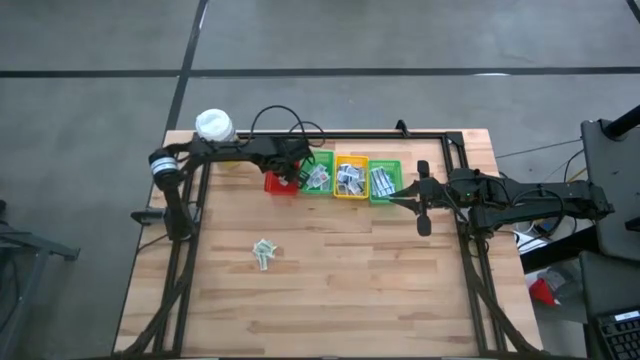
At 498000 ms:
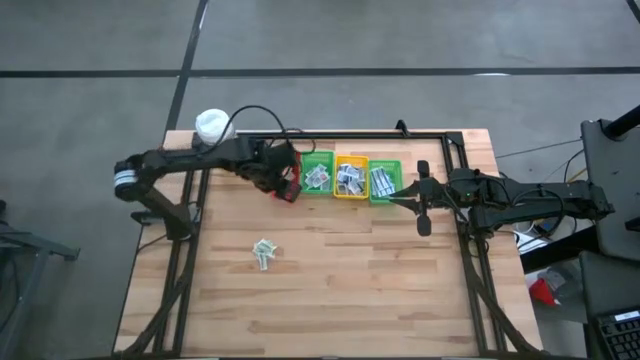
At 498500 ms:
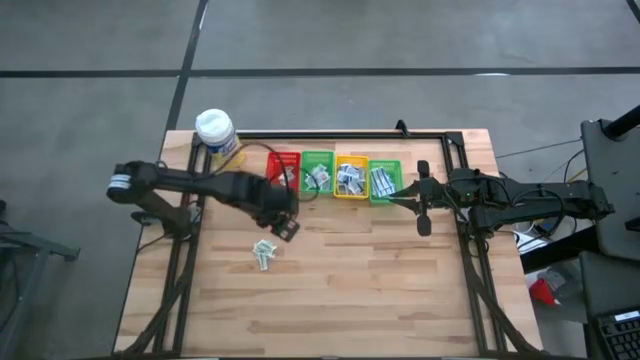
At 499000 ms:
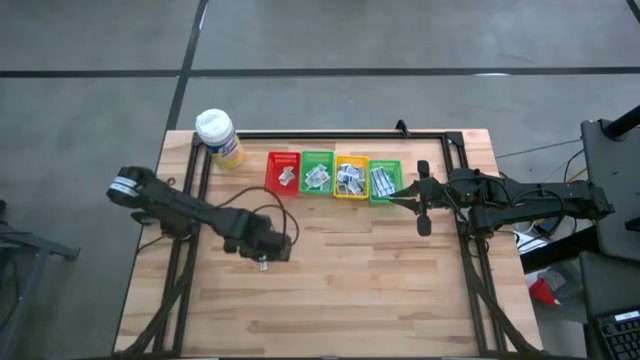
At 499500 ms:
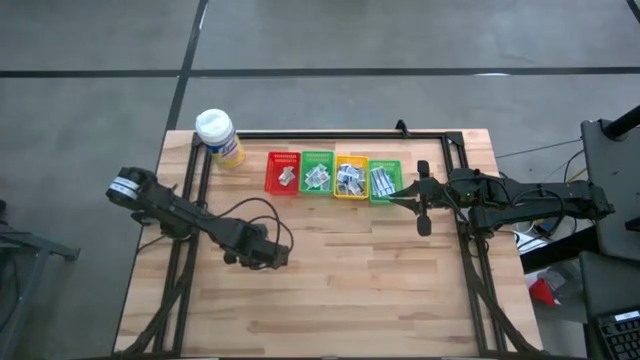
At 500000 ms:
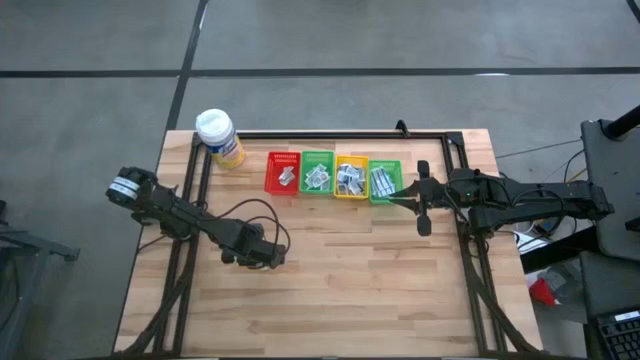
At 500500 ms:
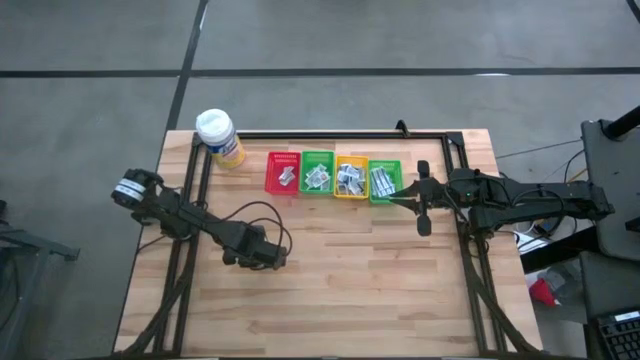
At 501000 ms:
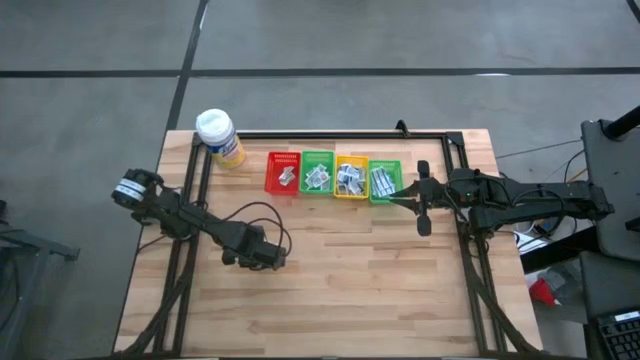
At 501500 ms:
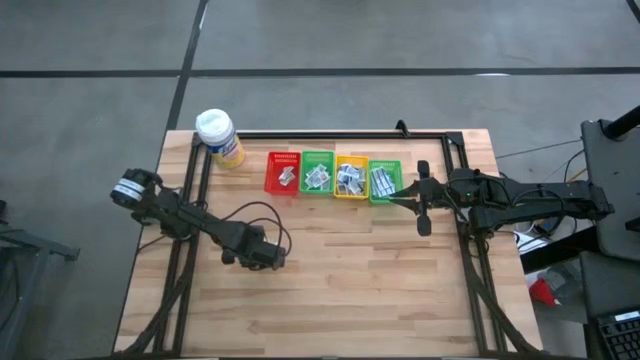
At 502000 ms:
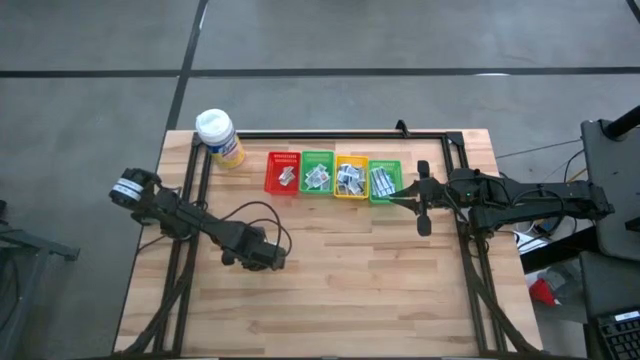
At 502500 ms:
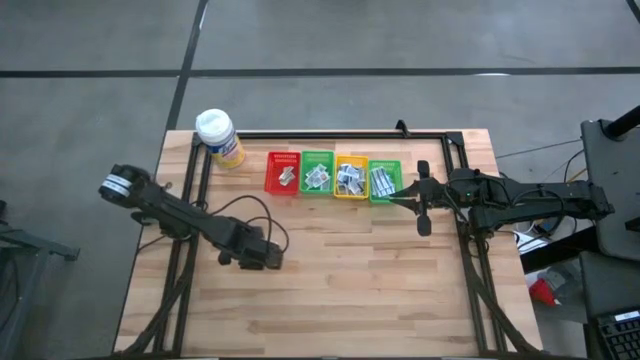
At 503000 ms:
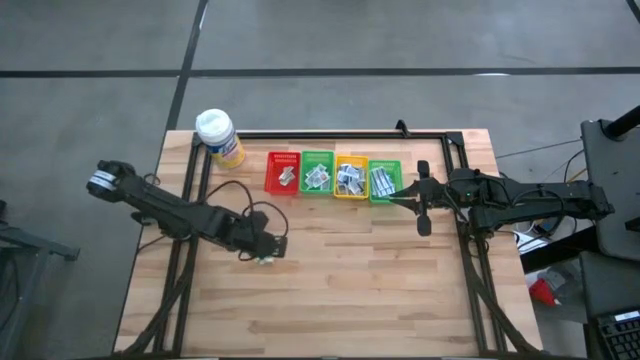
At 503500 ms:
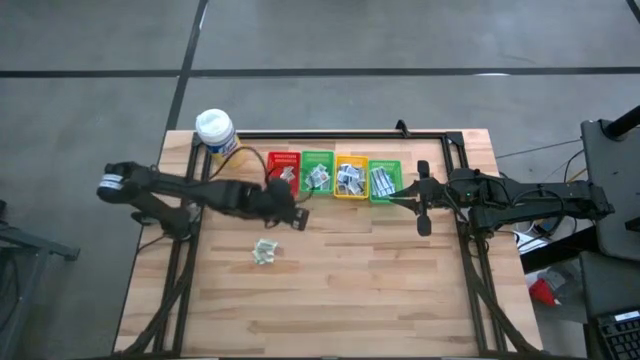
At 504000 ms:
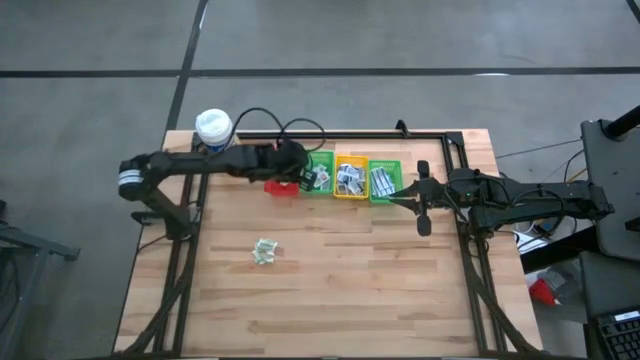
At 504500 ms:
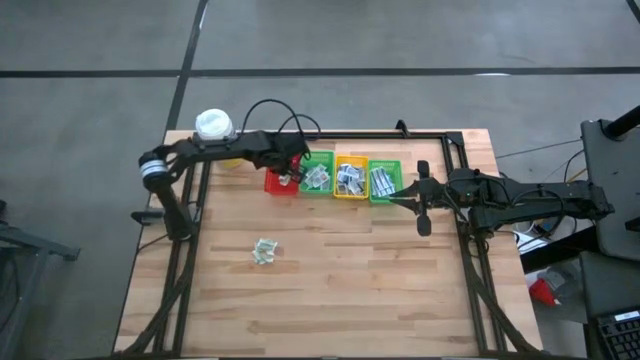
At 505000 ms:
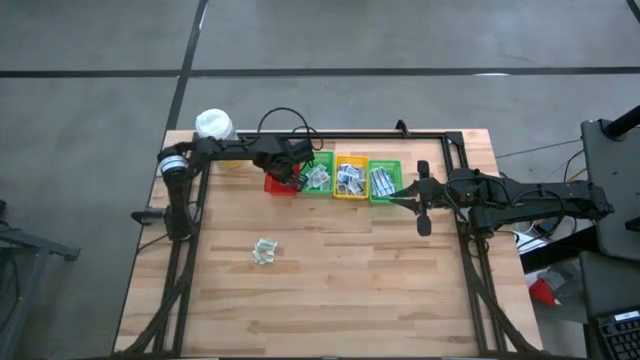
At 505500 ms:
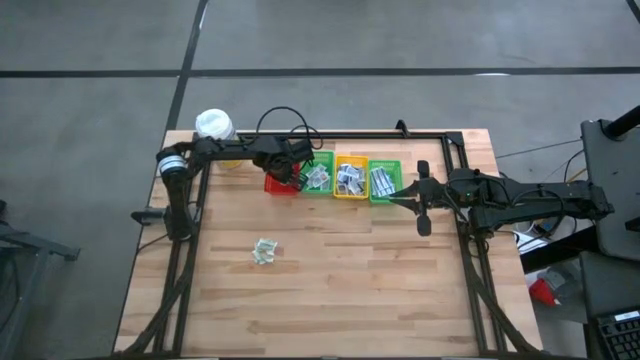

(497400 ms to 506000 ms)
Task: Pick & Place First Aid Supplies
Put the green bandage into the red bin

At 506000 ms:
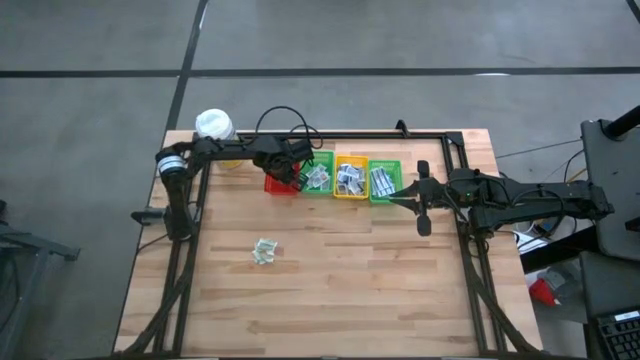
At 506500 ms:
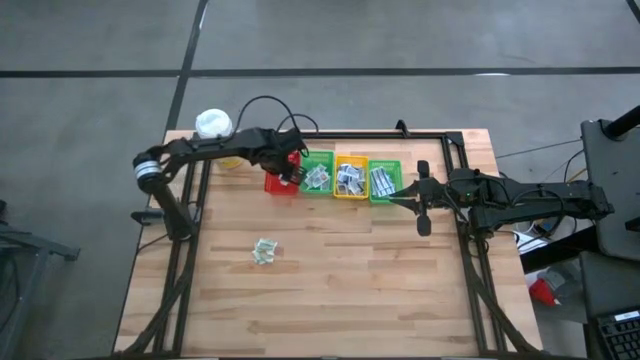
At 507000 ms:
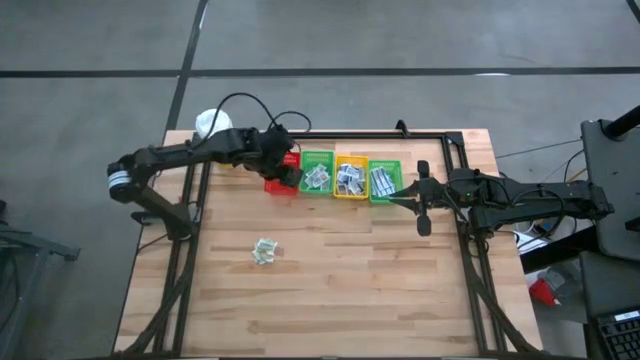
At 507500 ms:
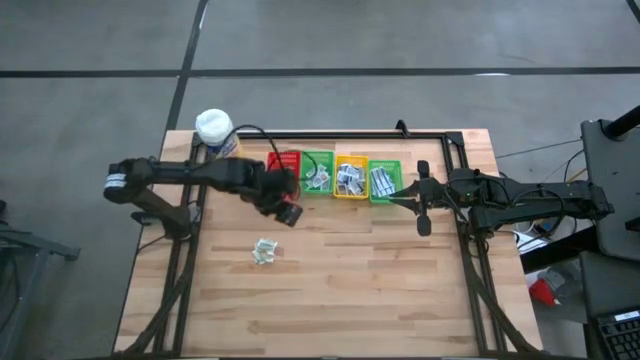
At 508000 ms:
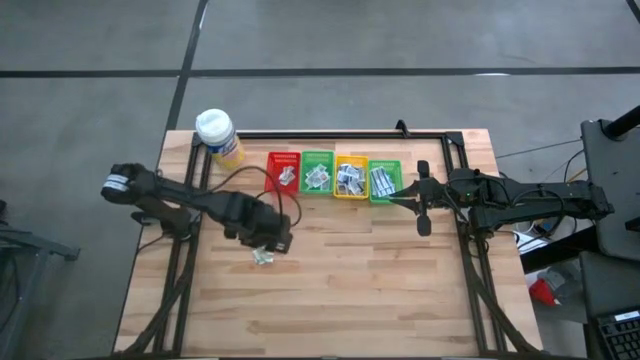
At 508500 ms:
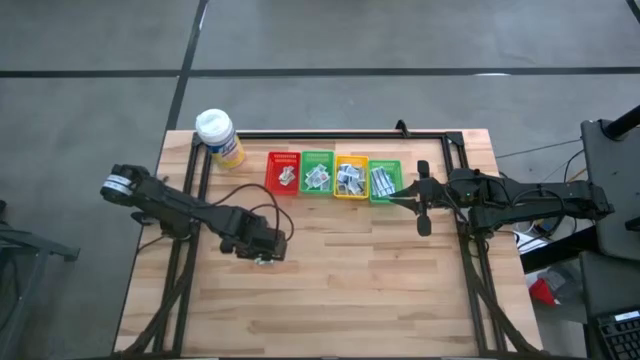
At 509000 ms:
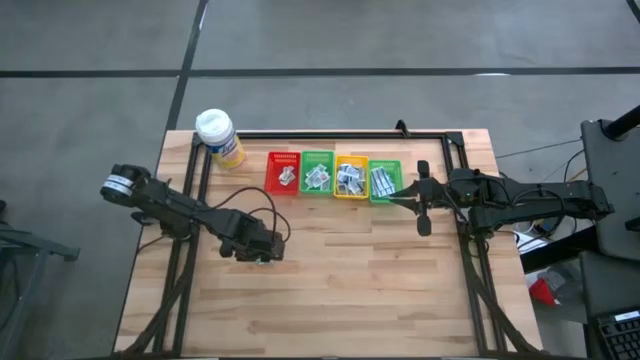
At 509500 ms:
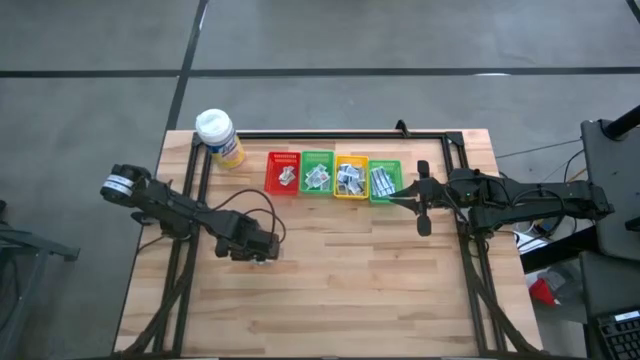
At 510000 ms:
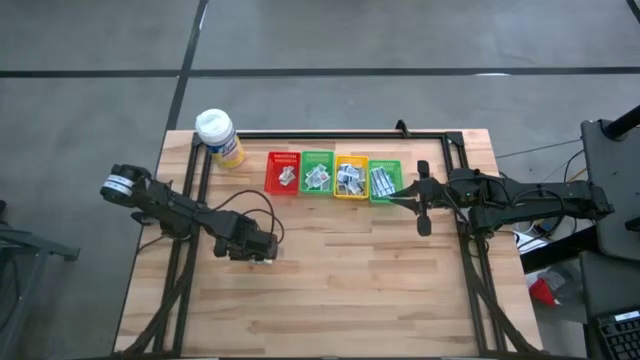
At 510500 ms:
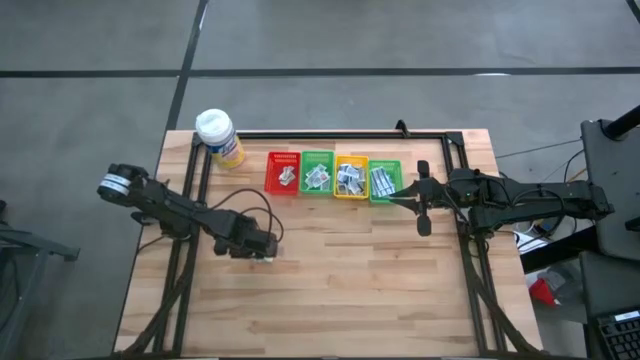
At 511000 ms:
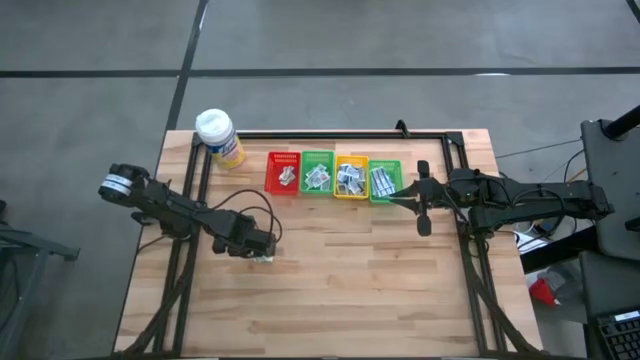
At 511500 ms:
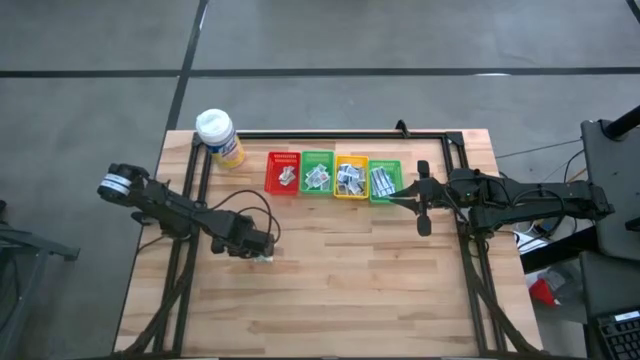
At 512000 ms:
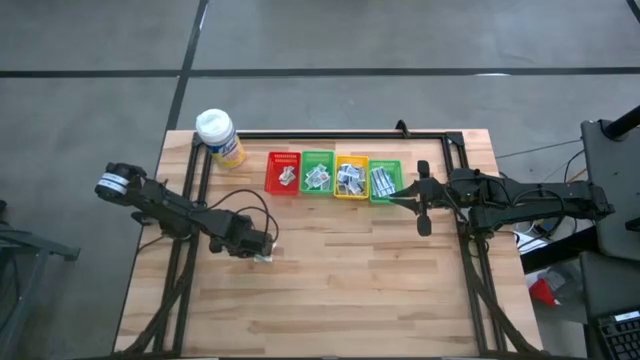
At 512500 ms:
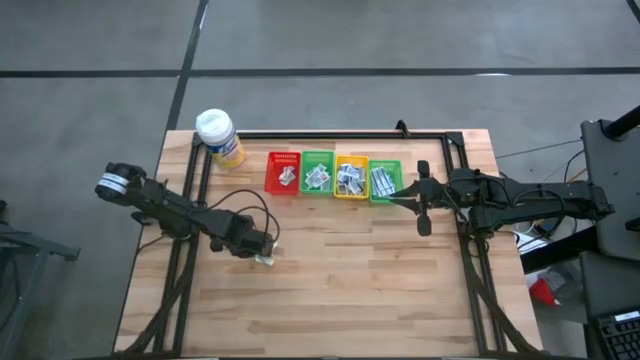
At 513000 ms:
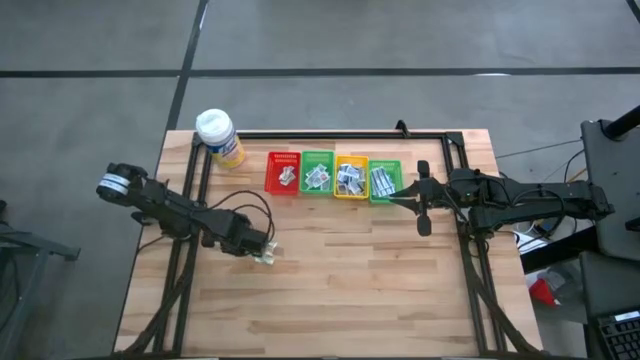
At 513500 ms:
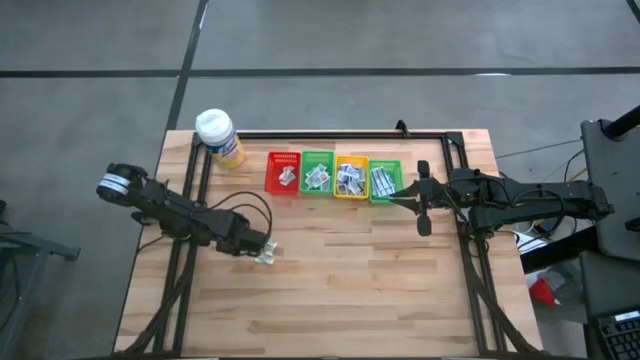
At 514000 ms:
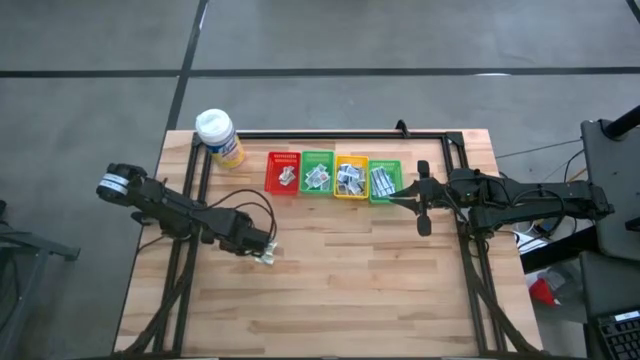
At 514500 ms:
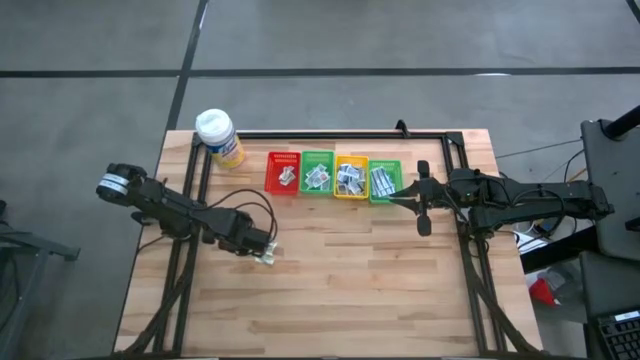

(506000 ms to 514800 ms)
Put the green bandage into the red bin

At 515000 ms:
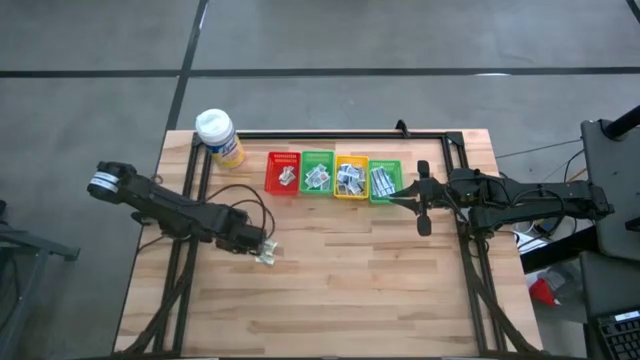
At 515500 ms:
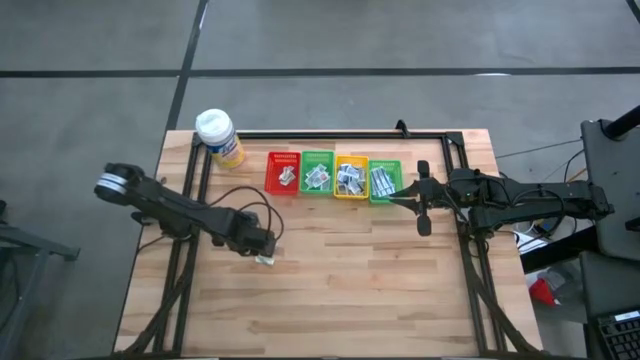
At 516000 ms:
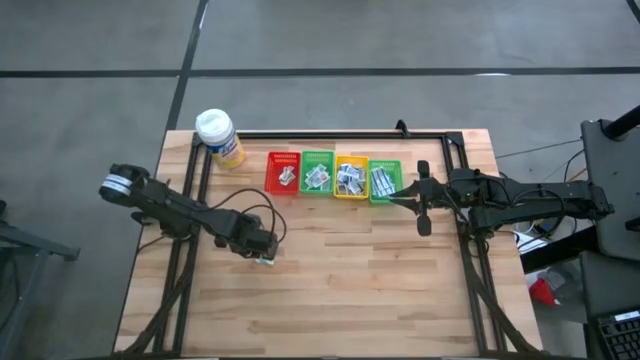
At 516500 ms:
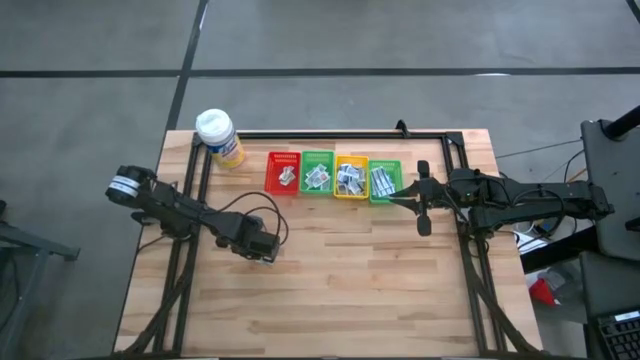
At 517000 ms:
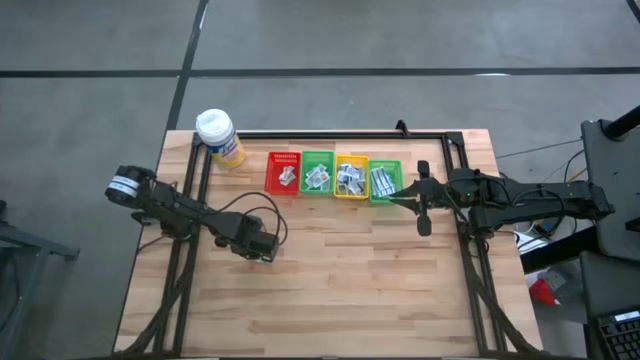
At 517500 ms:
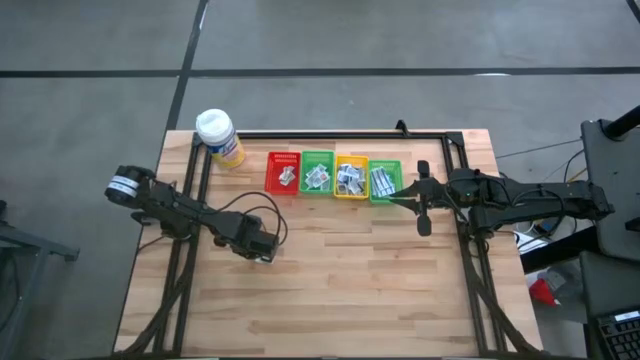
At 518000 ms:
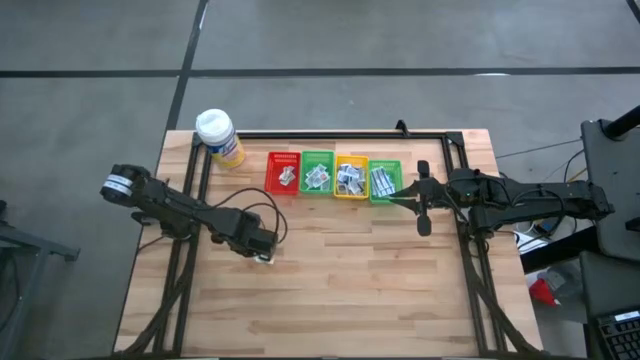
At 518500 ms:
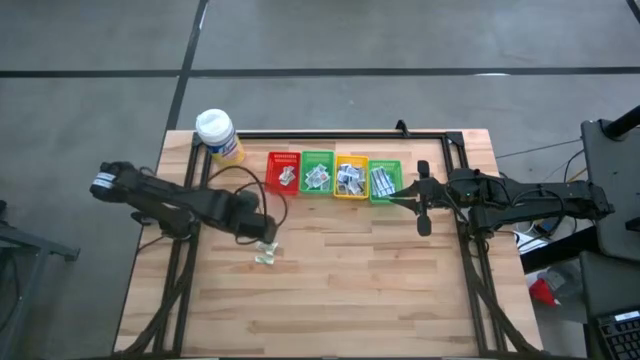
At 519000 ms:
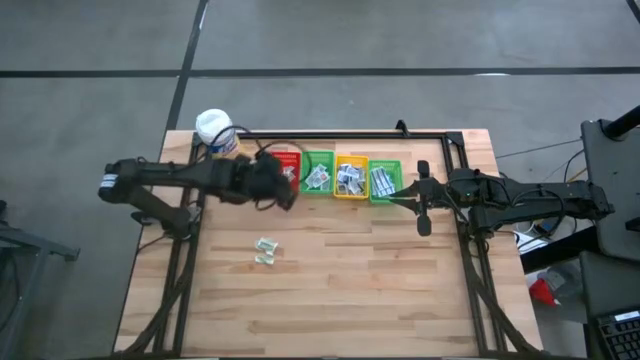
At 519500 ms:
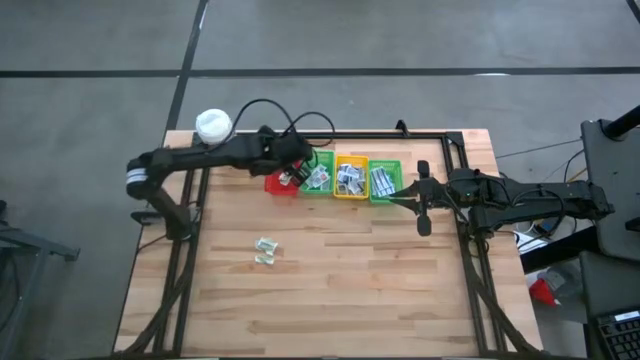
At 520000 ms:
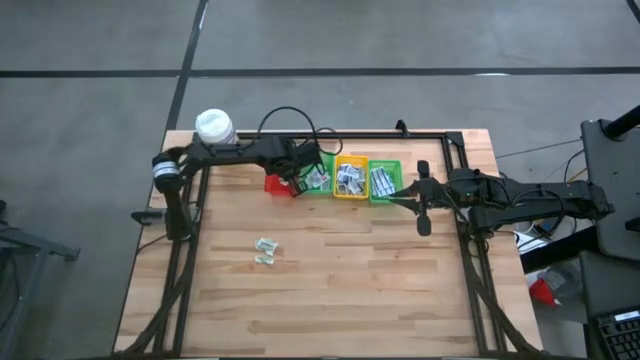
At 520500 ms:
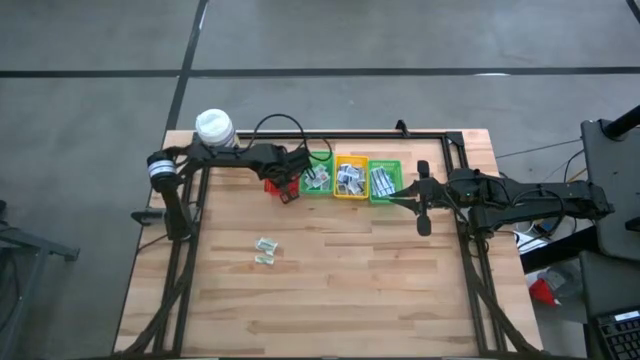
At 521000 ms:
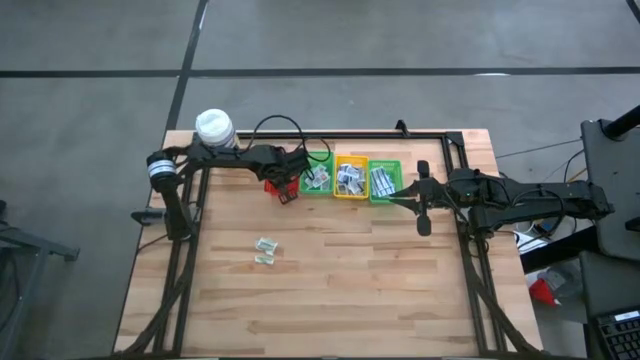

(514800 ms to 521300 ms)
Put the green bandage into the red bin
